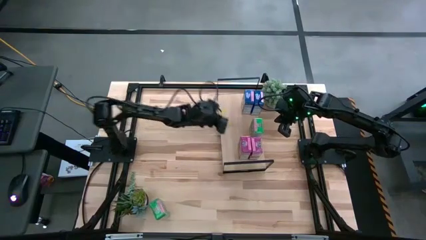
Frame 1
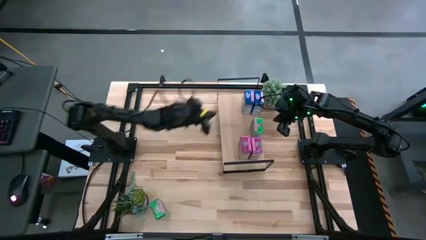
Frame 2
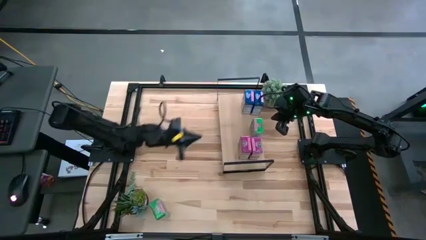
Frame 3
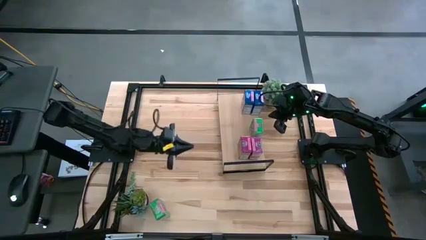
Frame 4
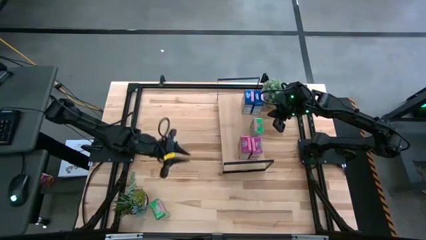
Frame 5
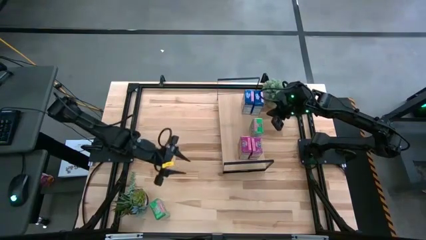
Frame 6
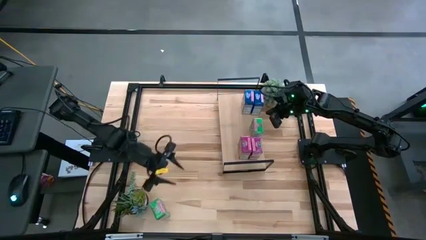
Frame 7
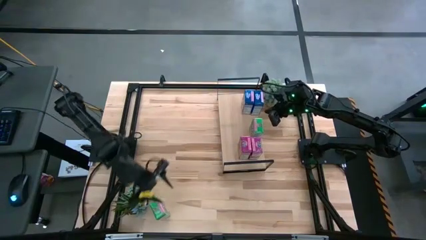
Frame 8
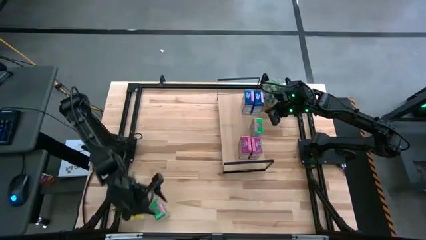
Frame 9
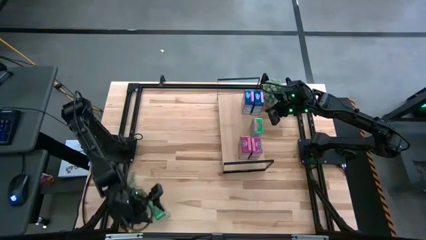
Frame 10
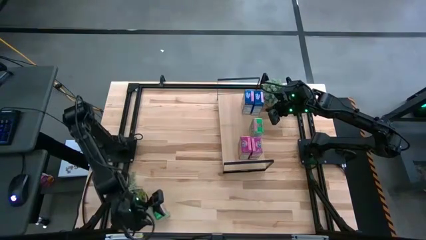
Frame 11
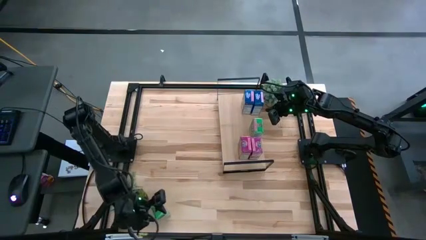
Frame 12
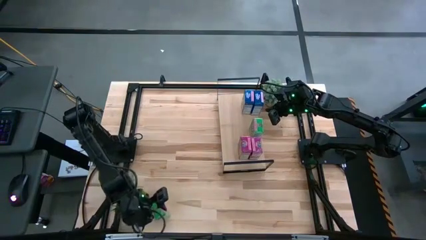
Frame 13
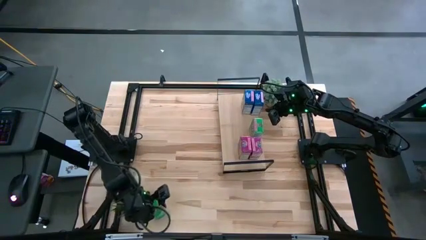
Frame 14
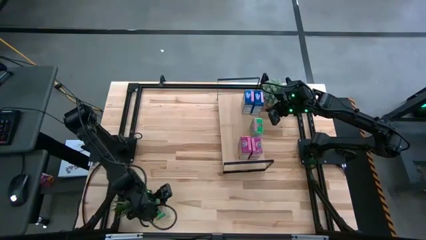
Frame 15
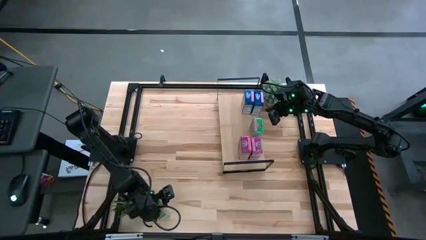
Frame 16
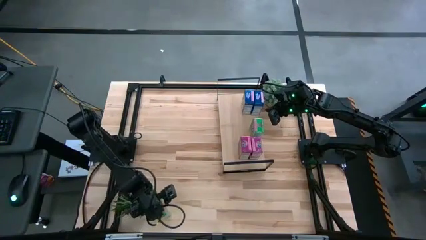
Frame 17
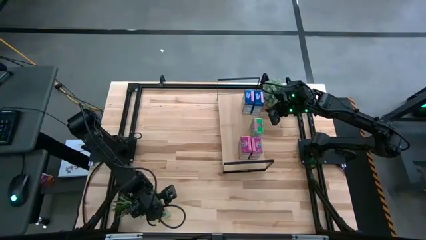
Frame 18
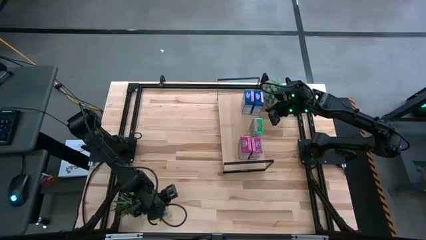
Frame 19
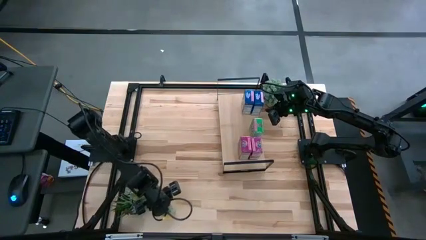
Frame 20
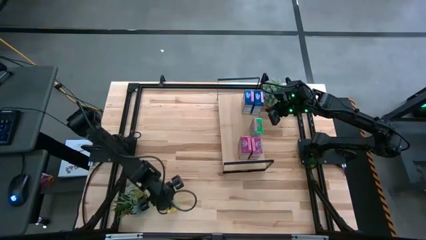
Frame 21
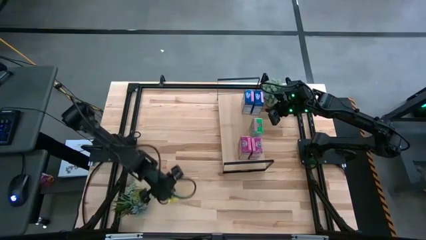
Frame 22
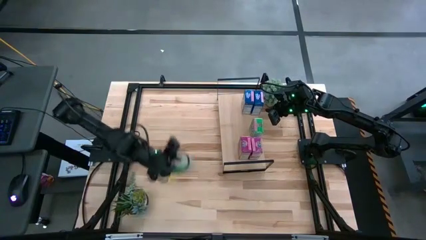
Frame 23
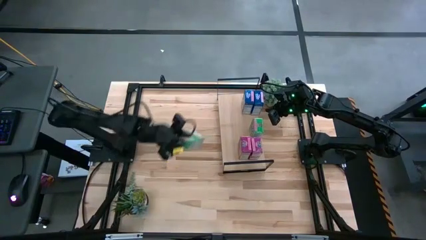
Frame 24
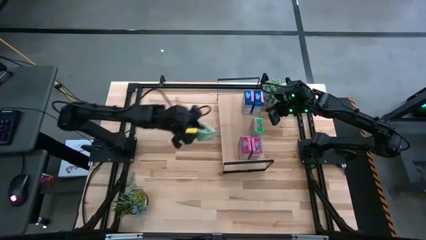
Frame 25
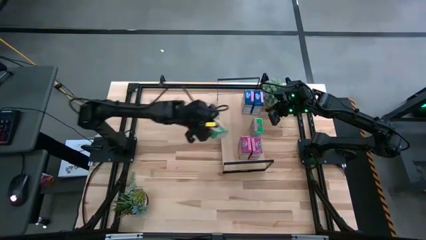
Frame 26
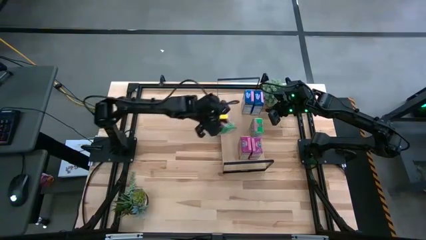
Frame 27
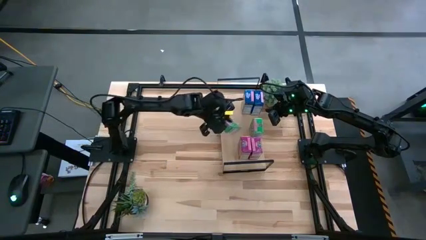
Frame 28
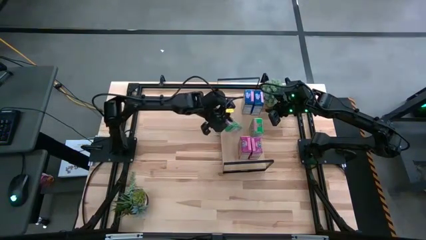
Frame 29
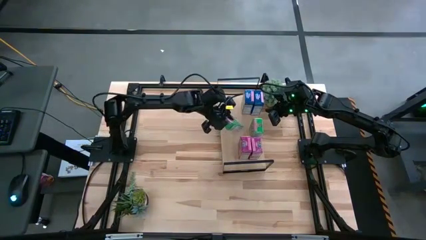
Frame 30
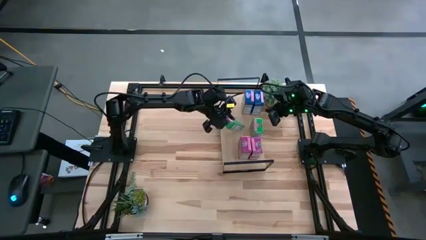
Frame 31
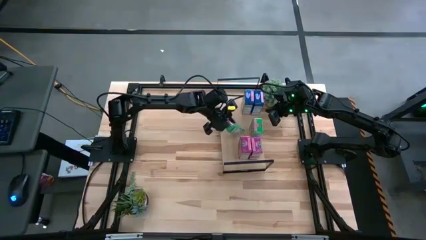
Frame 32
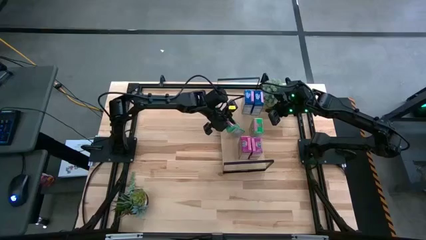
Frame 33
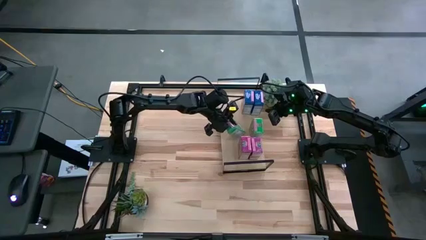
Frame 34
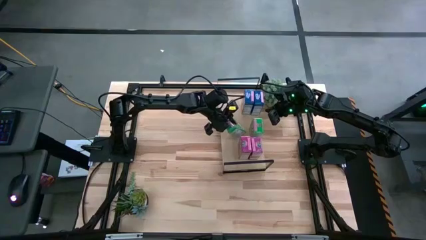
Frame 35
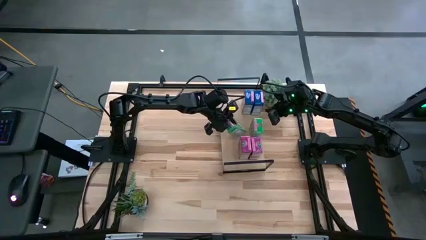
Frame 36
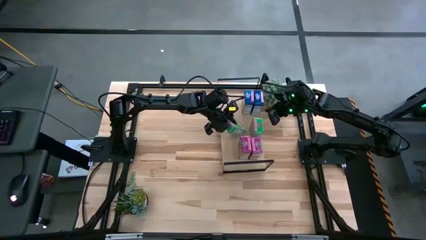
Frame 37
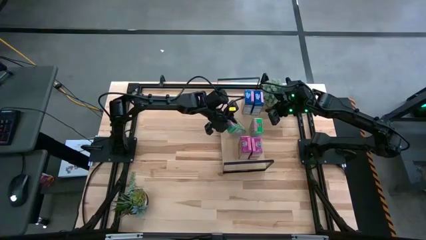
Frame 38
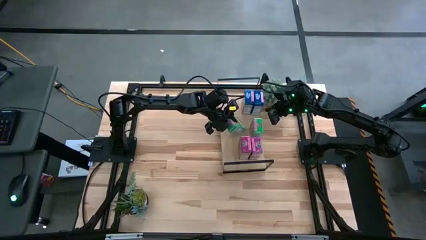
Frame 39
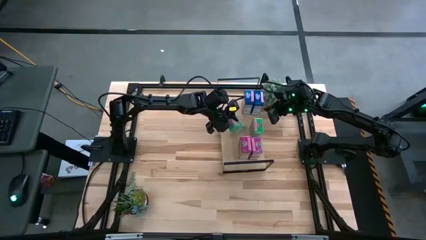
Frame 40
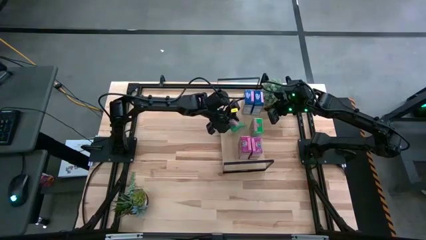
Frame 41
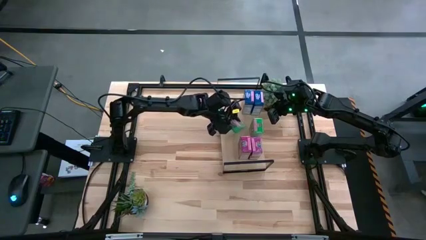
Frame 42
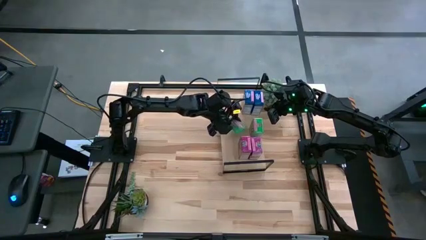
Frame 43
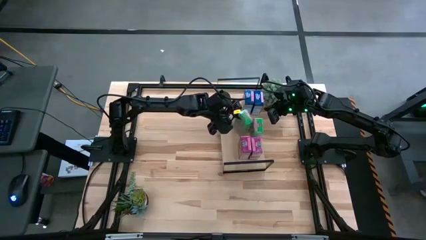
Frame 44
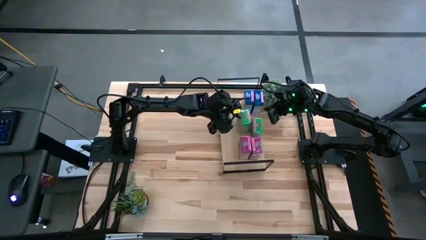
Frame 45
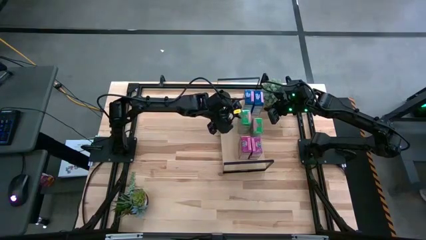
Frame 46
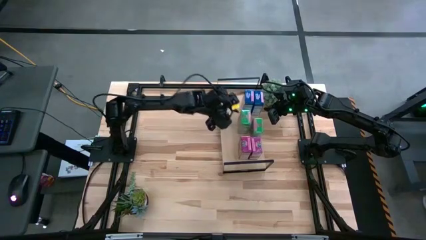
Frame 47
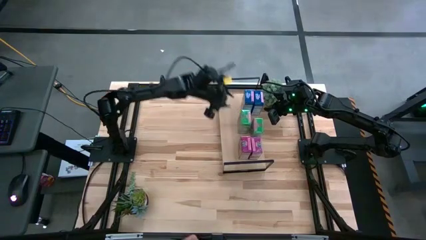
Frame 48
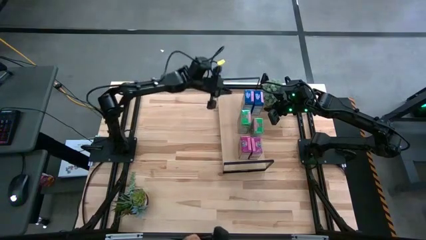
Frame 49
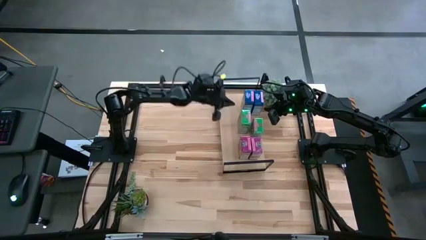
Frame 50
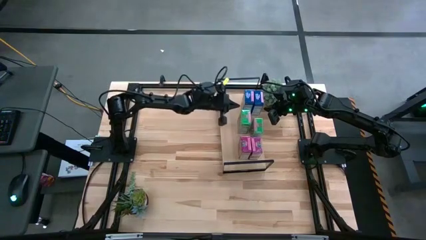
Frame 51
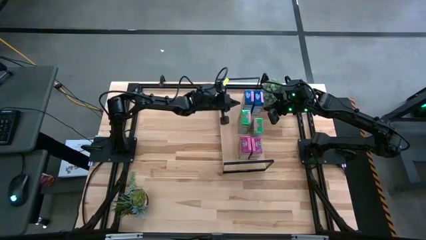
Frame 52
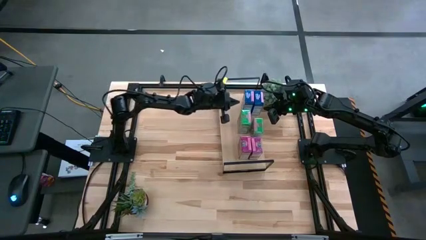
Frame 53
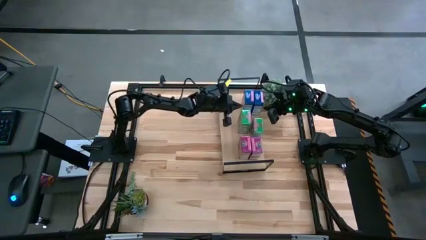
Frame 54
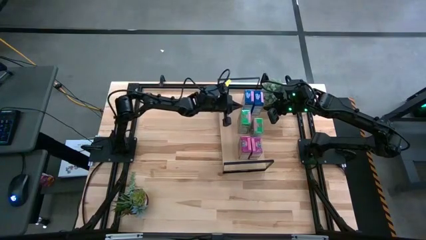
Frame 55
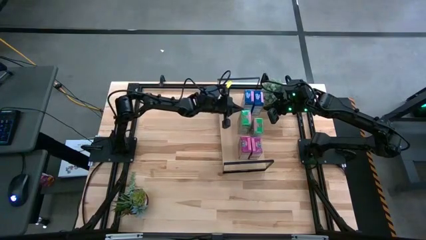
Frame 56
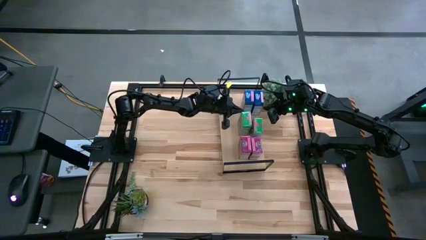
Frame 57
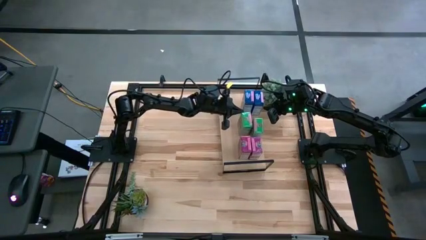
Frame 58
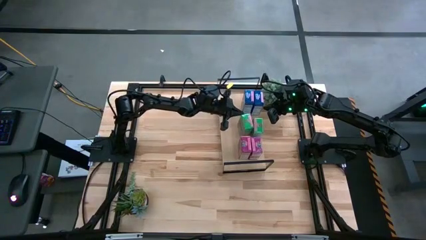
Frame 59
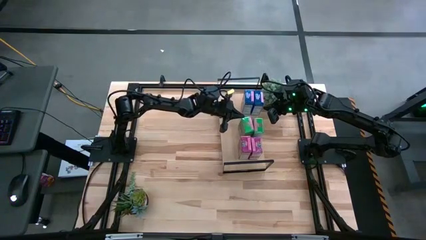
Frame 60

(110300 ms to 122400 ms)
Task: Stack cereal on shelf
Put the green cereal box on the shelf aligned with the other cereal box

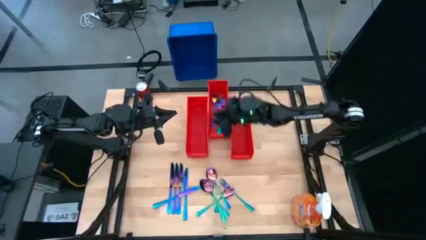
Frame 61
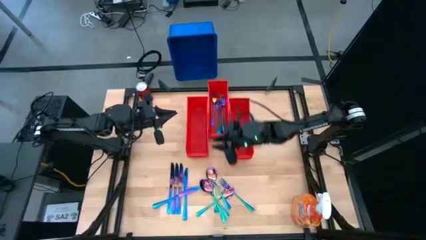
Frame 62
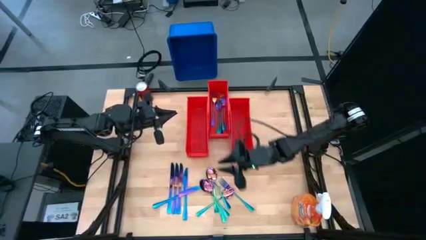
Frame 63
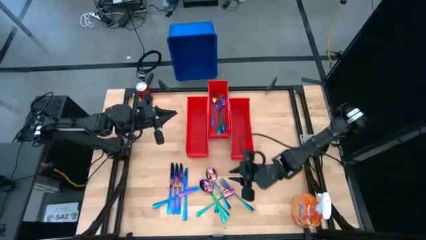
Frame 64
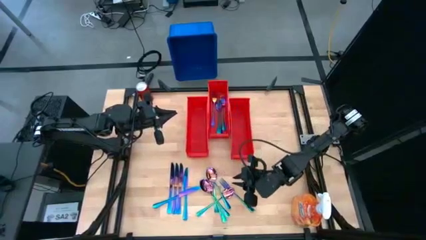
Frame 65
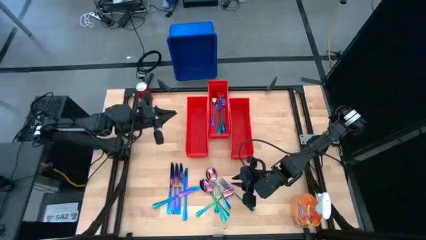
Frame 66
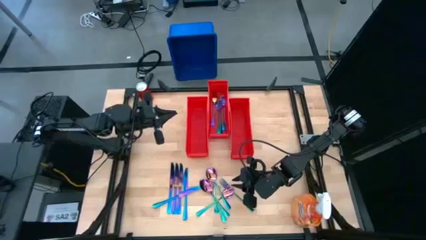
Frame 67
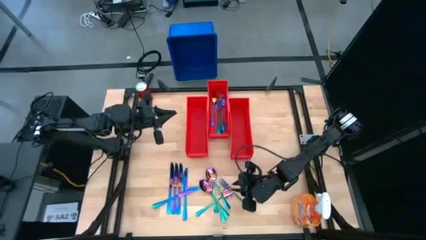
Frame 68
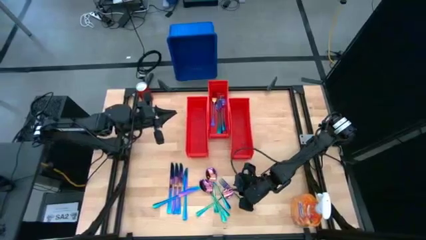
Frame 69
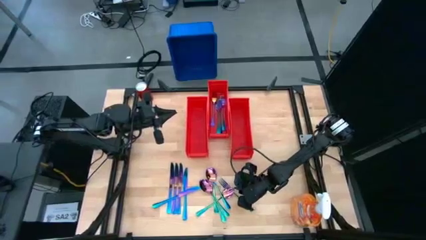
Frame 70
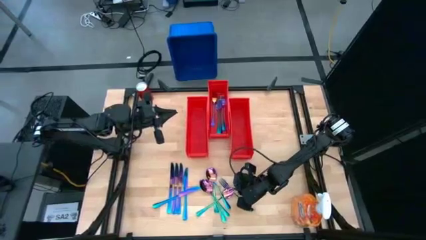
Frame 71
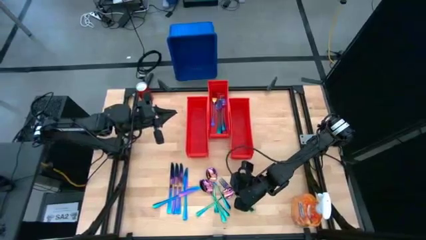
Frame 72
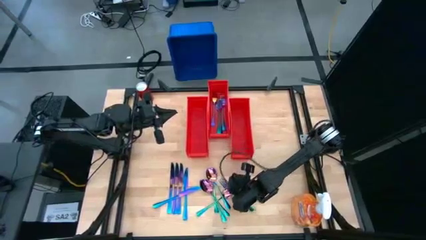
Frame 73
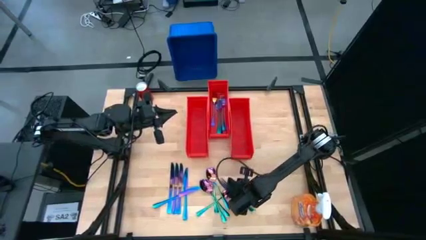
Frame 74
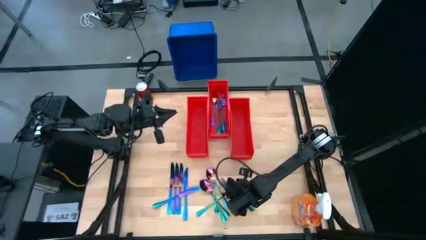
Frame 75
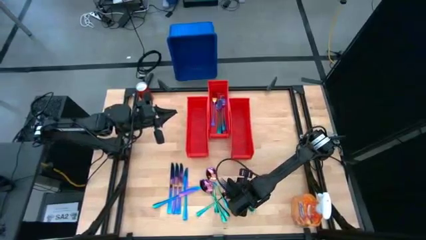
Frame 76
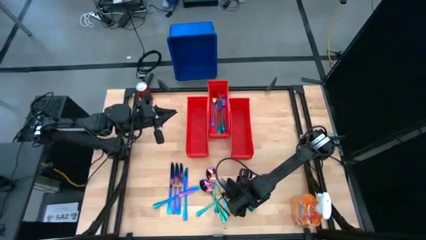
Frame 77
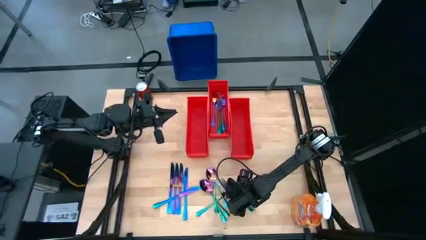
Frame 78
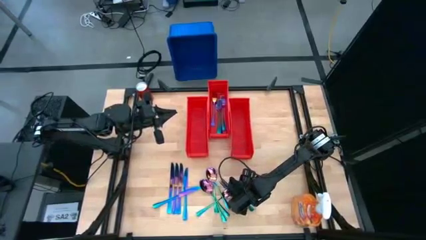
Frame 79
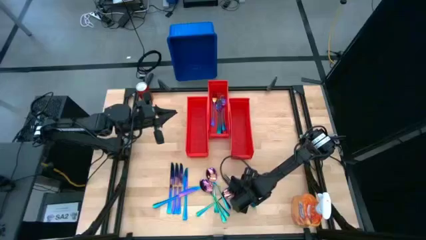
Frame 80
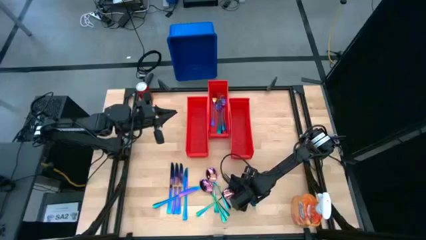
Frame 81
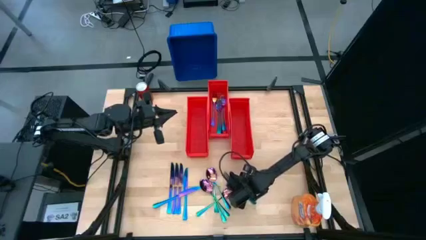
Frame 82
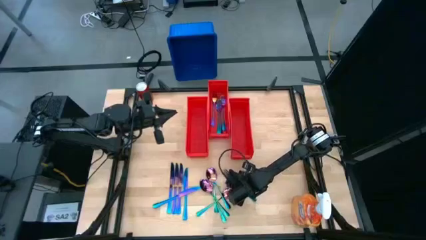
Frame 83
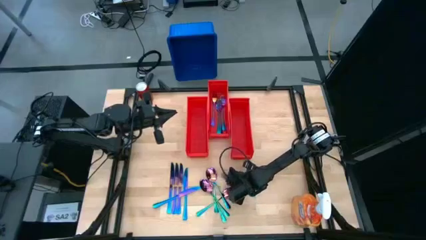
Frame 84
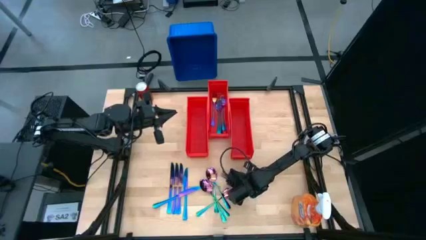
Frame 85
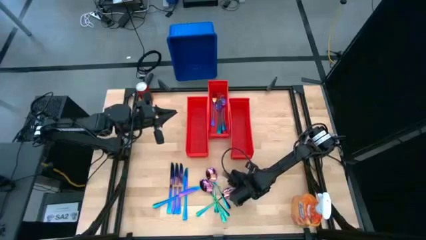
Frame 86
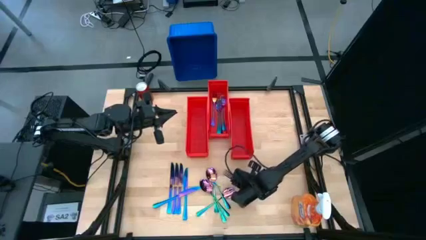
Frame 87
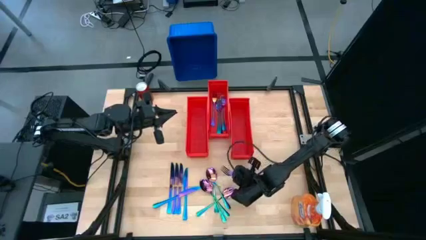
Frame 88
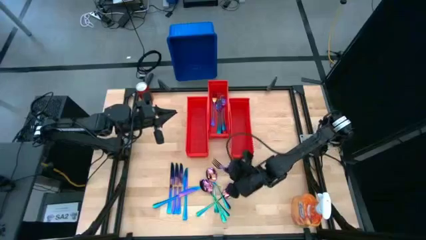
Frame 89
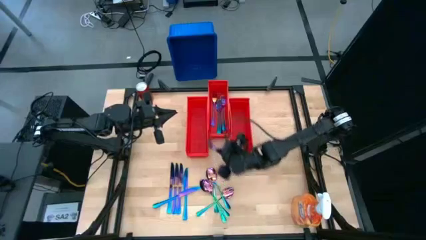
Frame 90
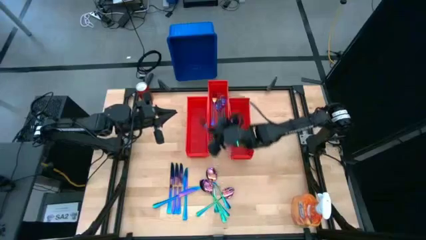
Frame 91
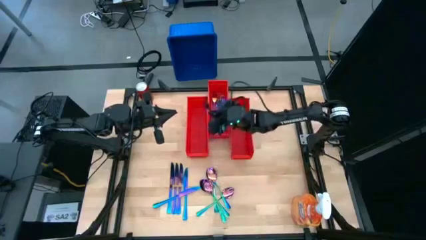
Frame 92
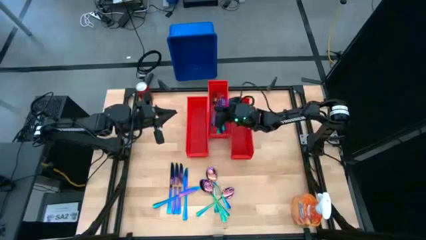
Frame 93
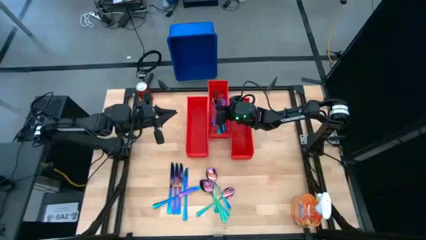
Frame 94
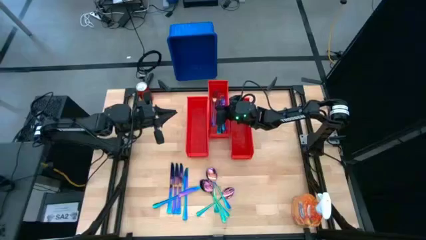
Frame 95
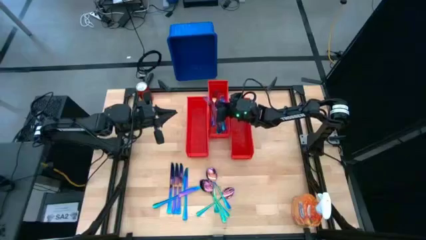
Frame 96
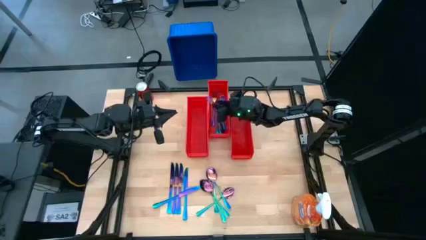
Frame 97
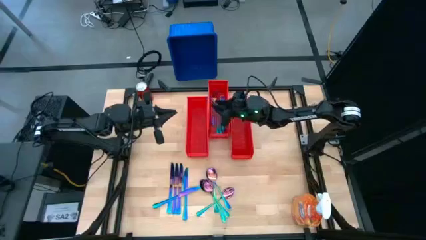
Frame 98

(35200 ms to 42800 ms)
Task: Sort silverware
Put the iridescent fork into the middle orange bin
